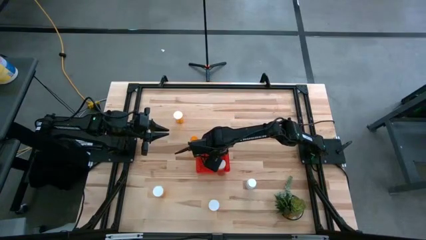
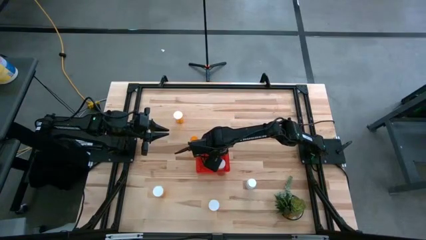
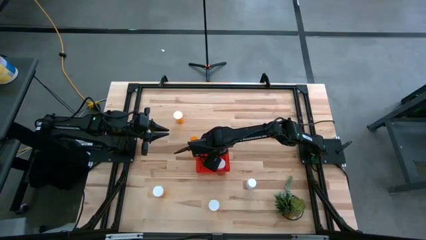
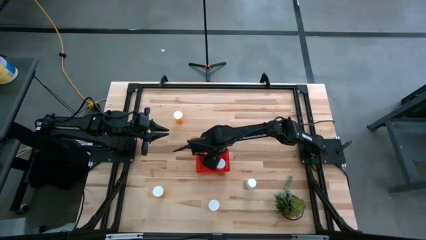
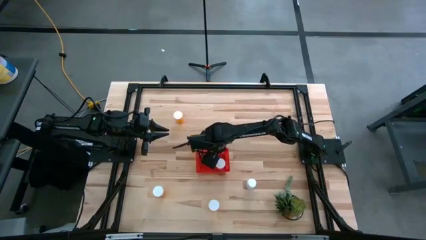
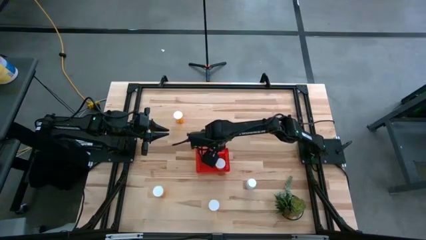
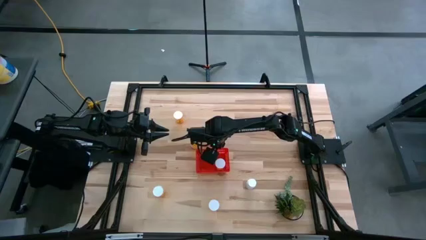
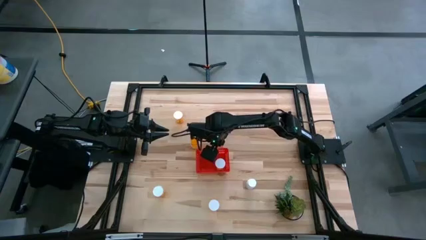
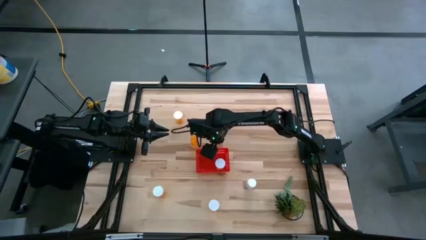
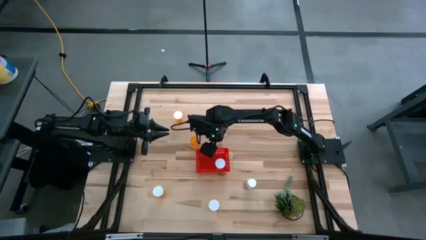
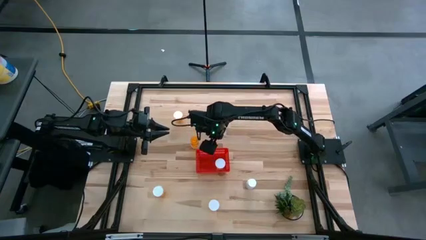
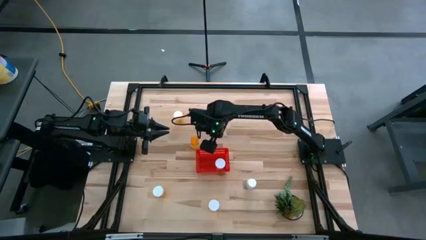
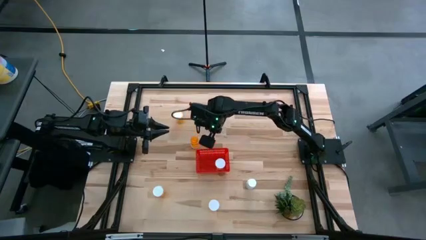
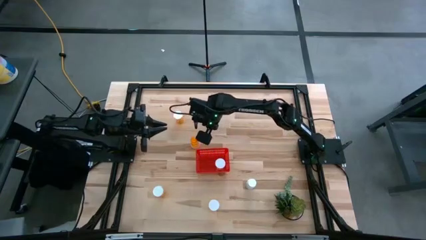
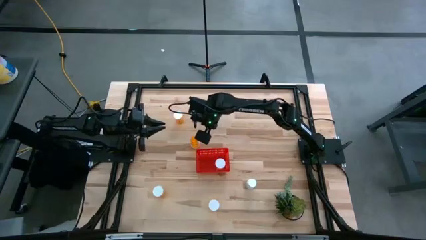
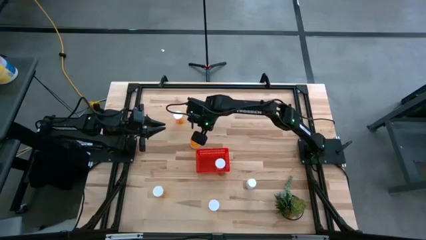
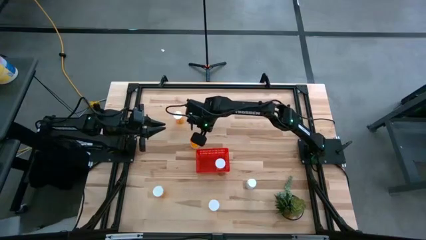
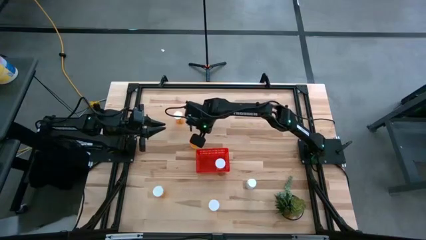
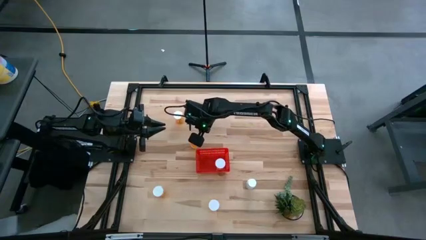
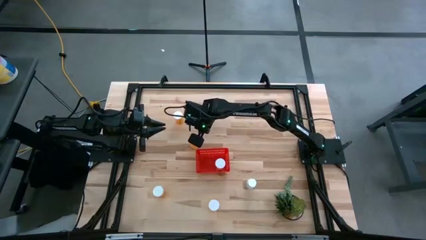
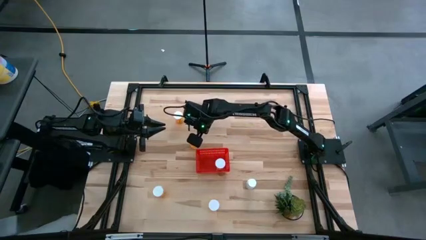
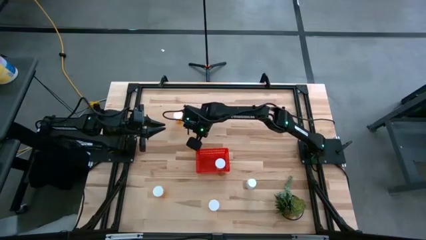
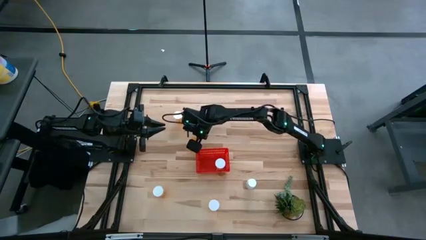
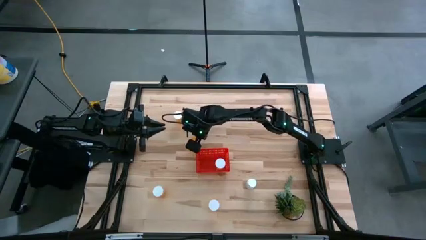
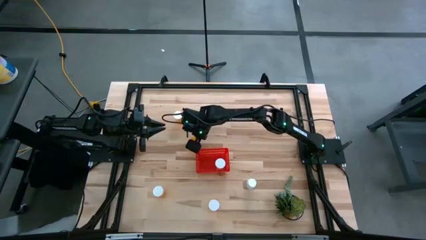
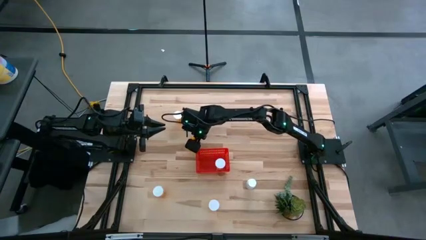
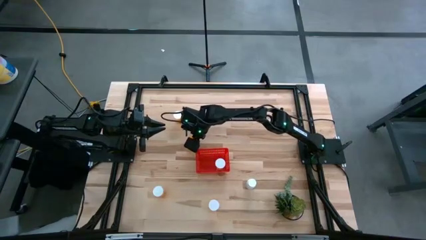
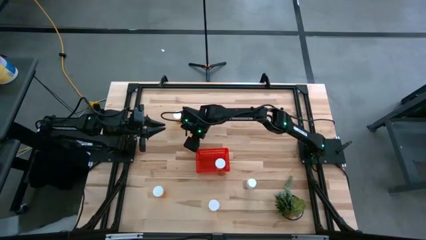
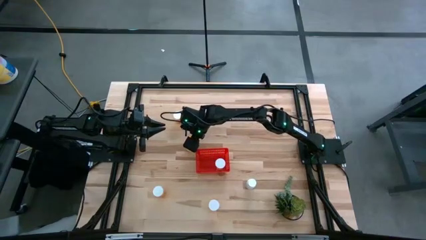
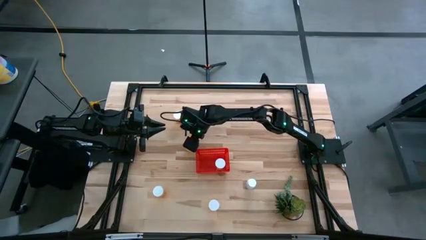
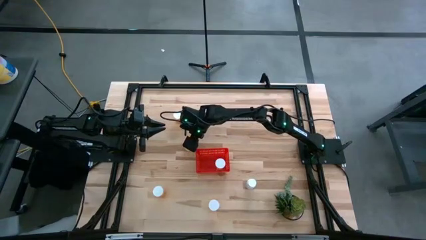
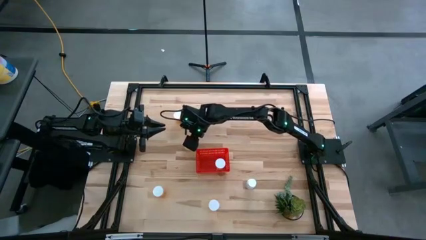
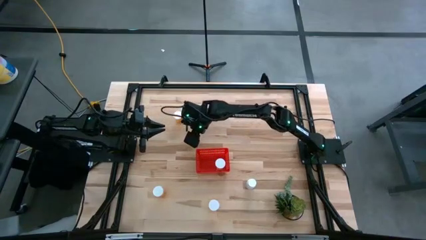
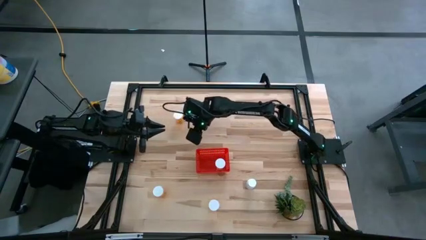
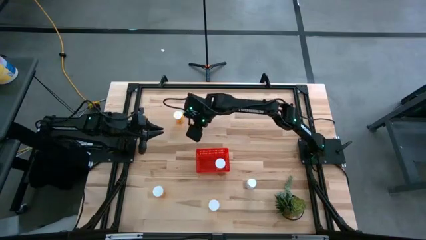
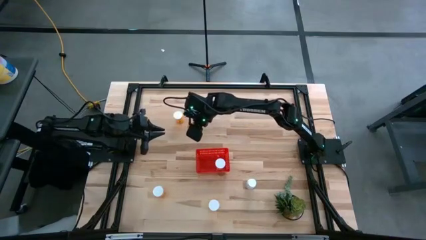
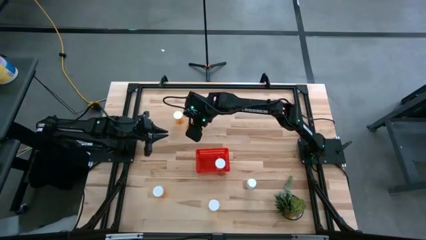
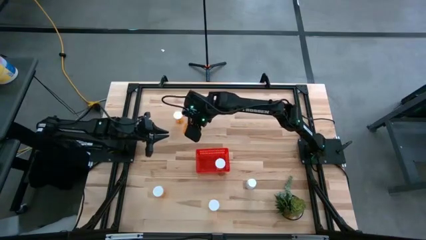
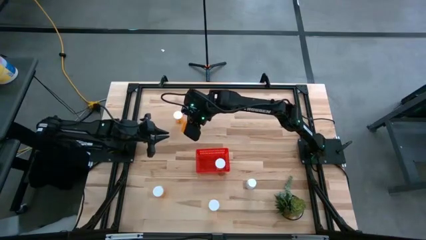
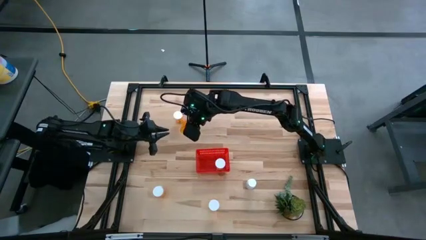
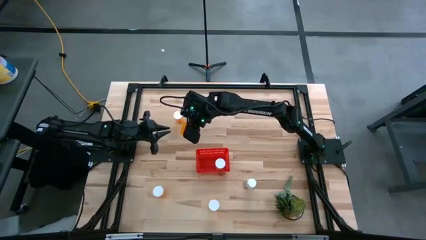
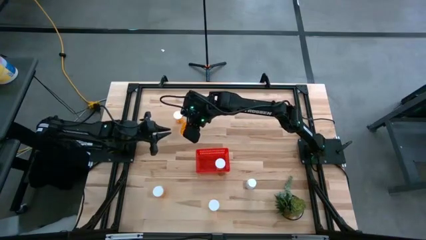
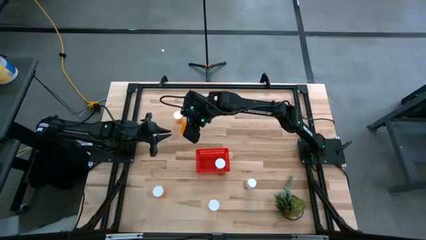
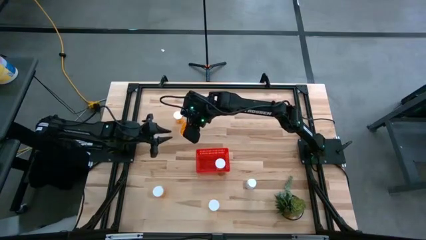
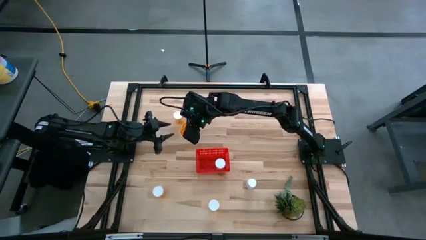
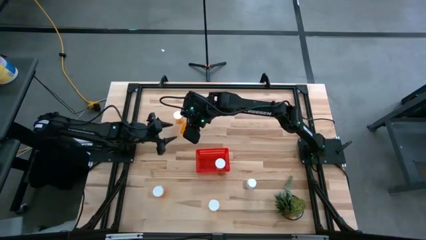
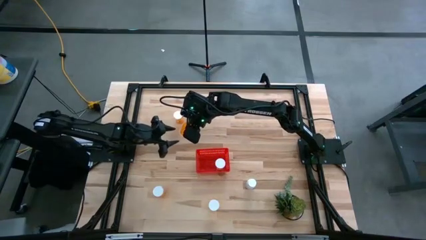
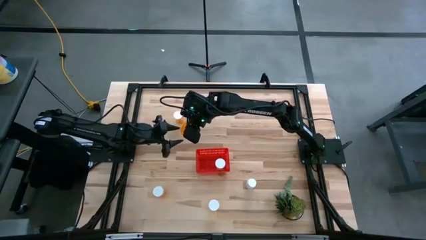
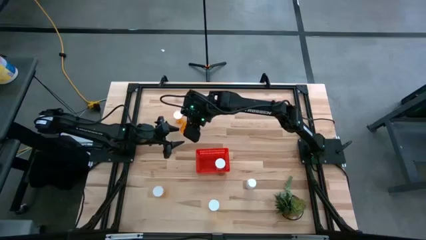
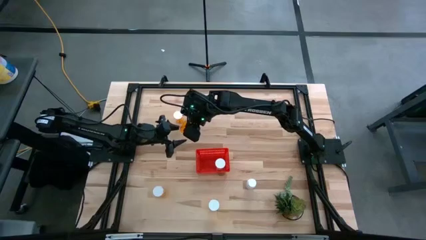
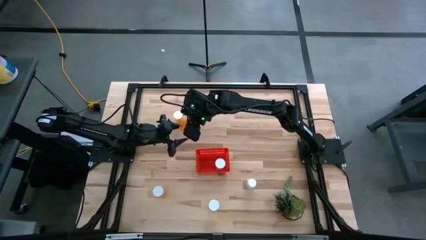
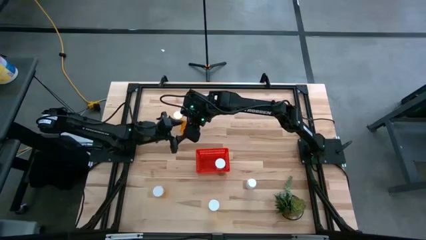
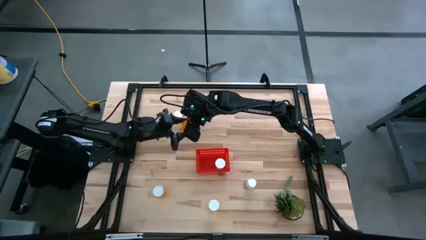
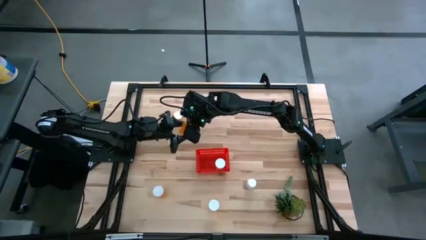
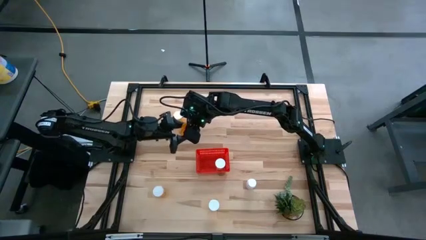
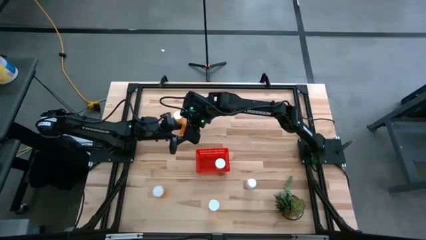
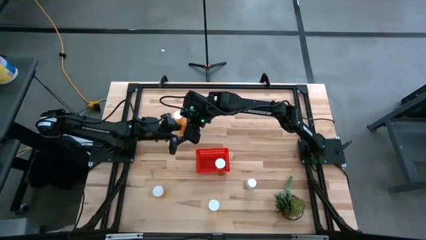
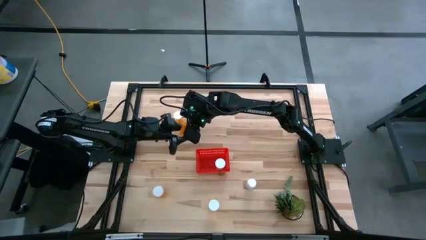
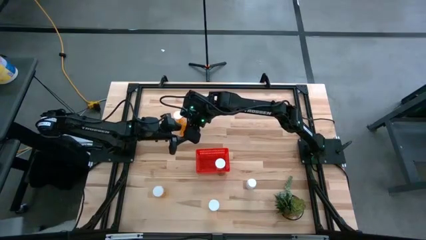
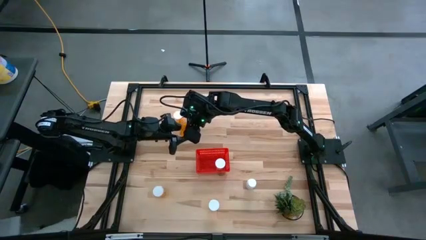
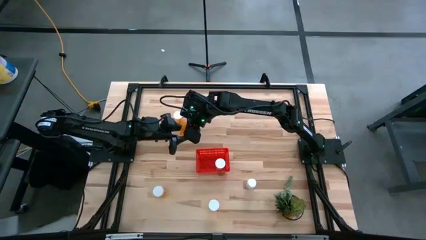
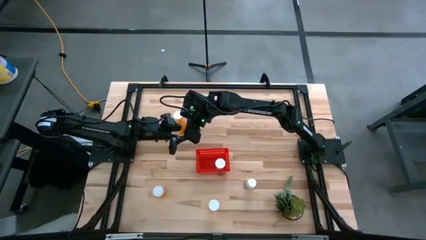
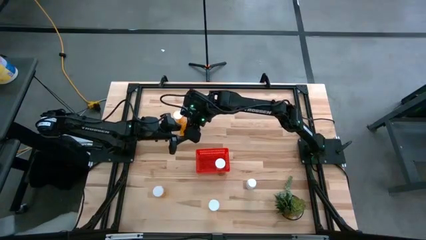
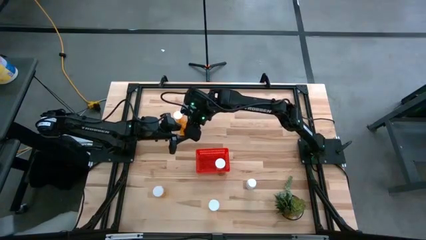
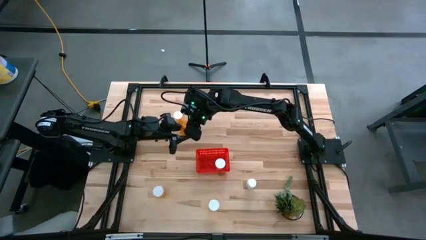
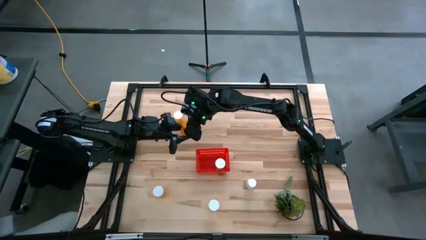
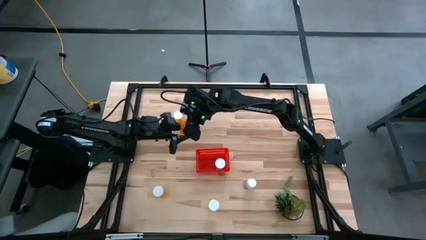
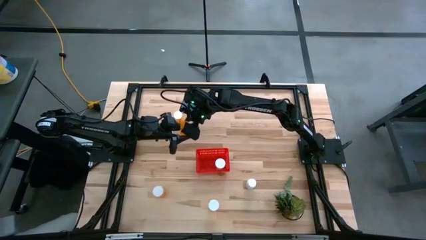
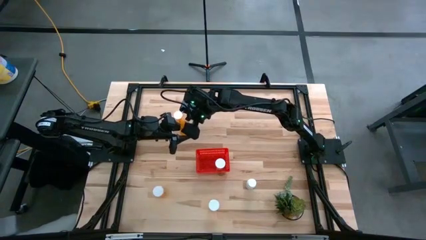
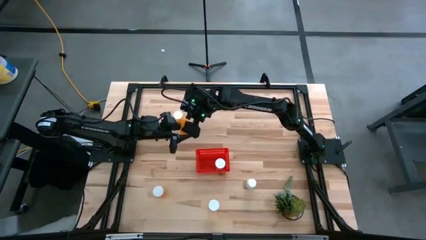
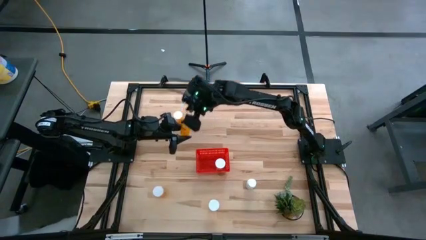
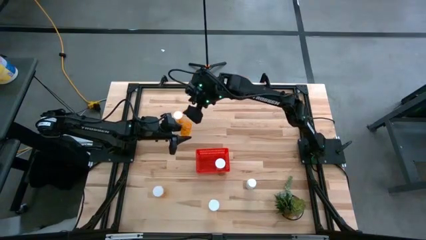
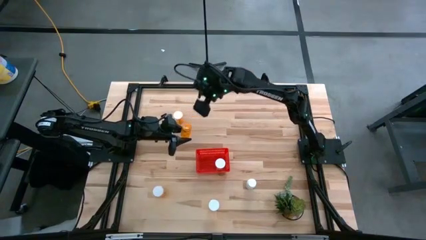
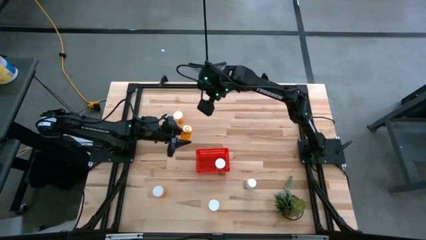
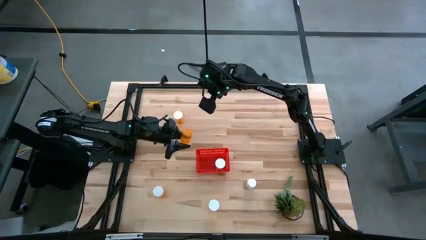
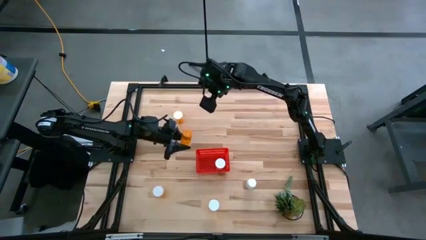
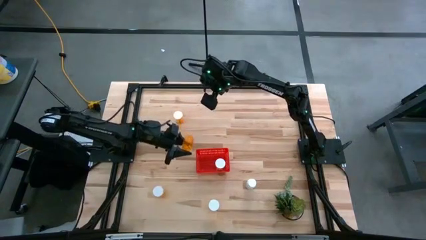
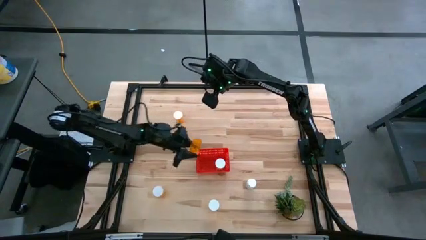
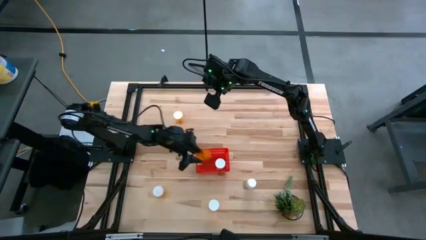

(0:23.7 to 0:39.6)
Task: Pick and place pill bottles into a basket
Put the orange pill bottle into the red basket

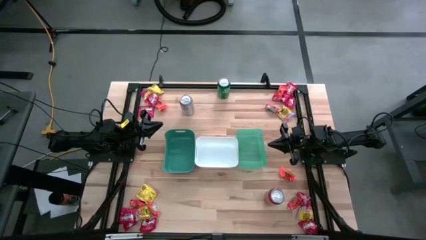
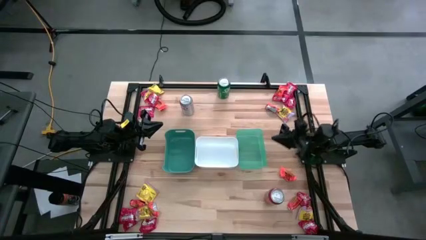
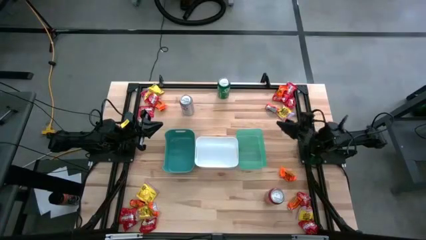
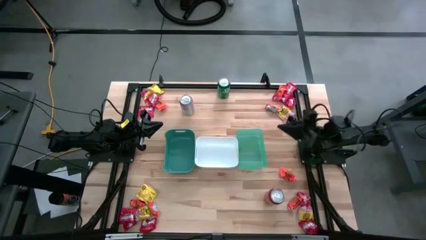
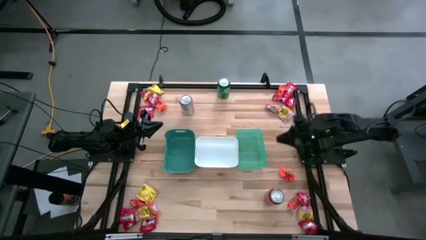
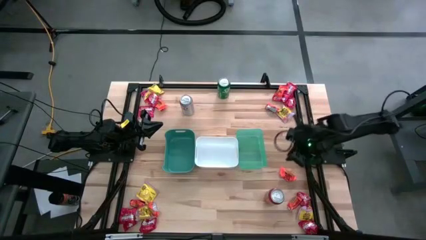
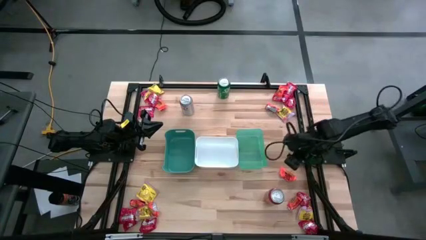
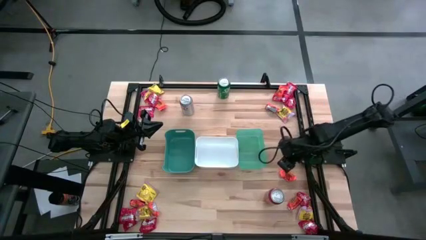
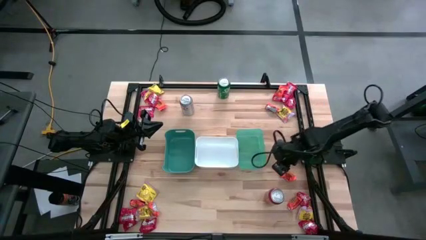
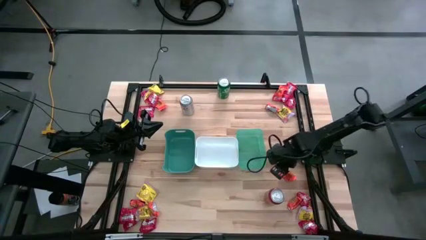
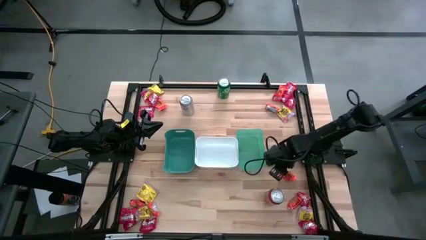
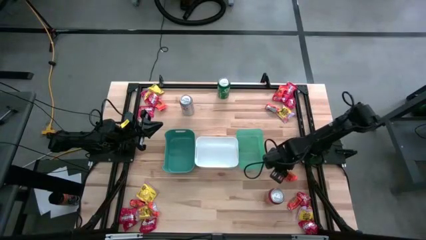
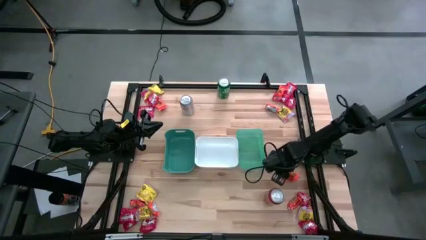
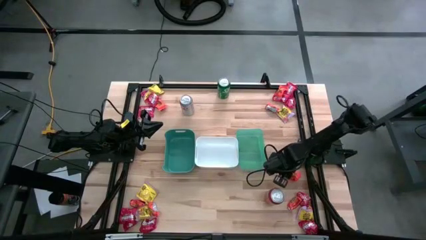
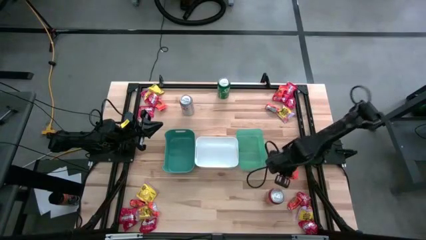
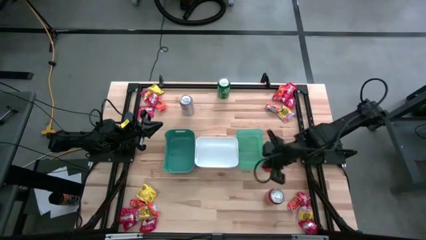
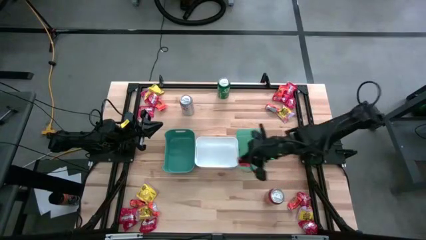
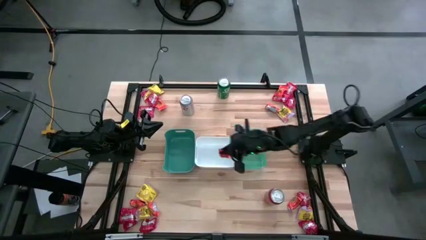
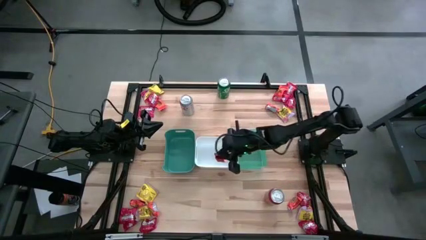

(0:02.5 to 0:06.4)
Task: Sort candy
Put the orange chocolate into the white bin
